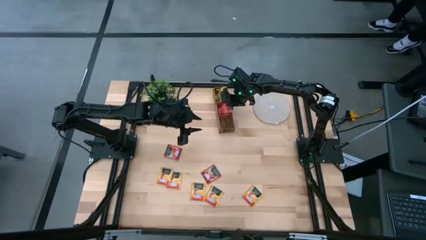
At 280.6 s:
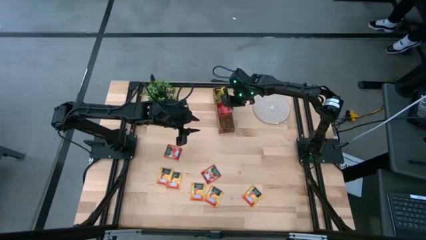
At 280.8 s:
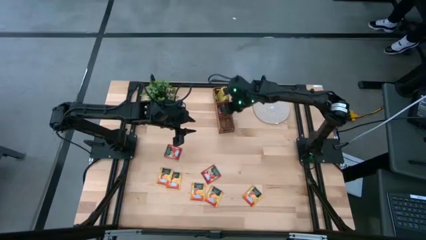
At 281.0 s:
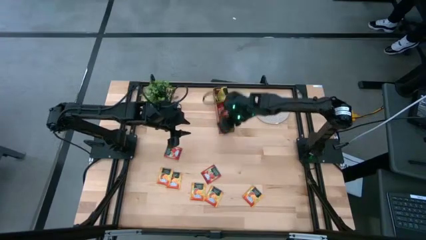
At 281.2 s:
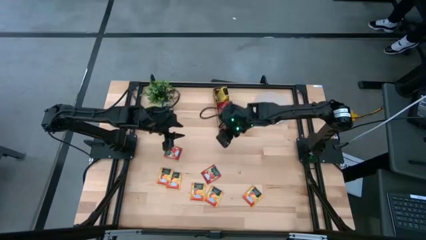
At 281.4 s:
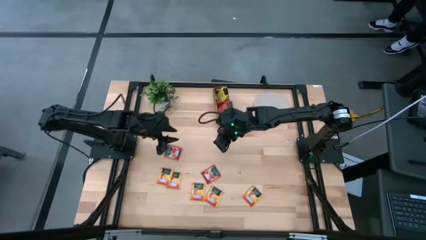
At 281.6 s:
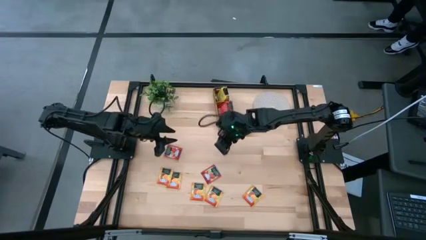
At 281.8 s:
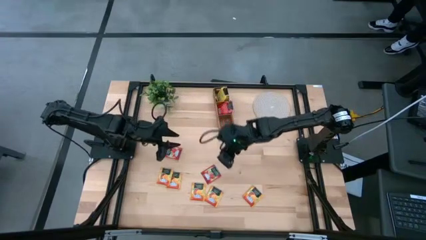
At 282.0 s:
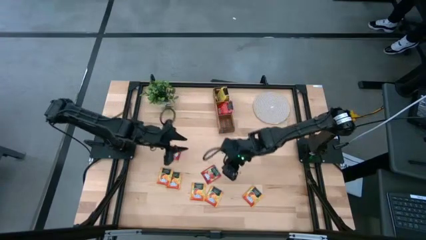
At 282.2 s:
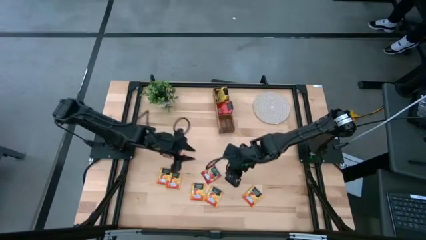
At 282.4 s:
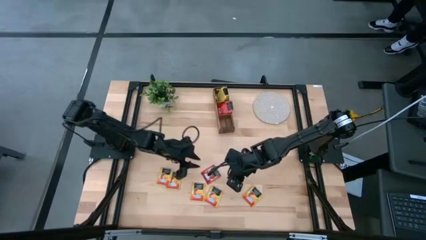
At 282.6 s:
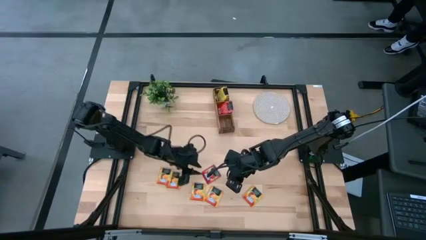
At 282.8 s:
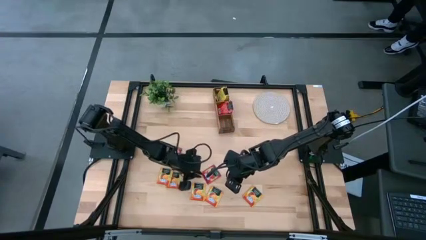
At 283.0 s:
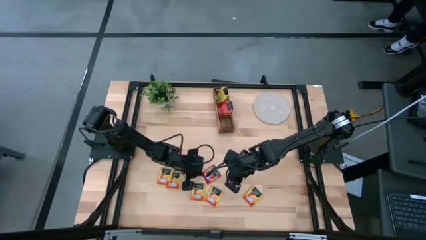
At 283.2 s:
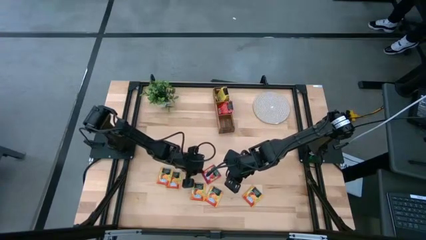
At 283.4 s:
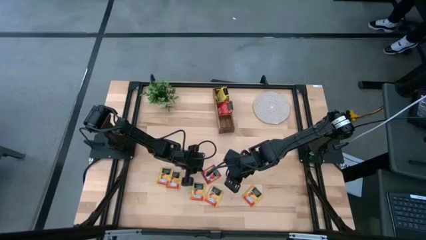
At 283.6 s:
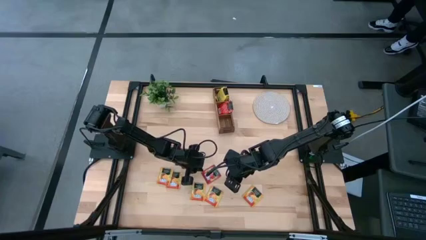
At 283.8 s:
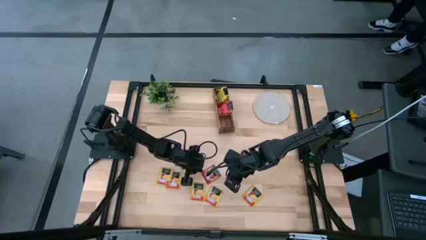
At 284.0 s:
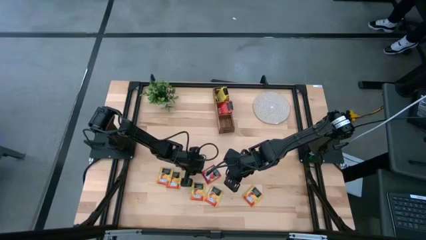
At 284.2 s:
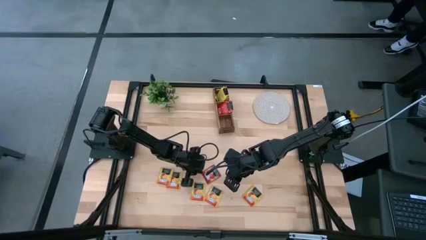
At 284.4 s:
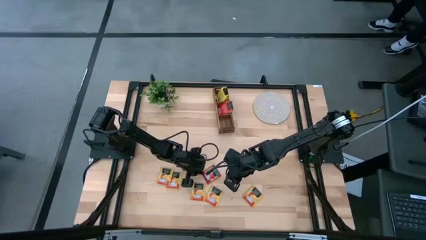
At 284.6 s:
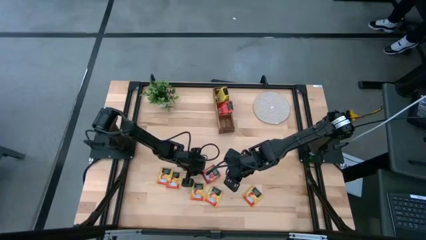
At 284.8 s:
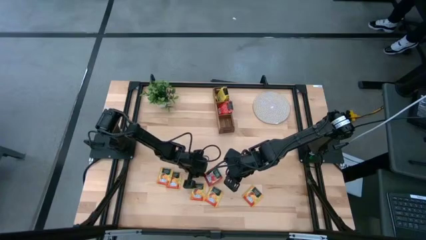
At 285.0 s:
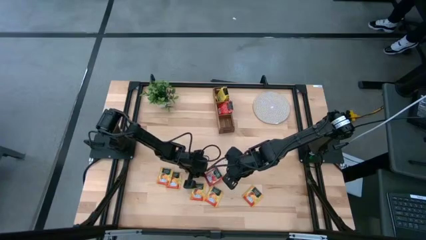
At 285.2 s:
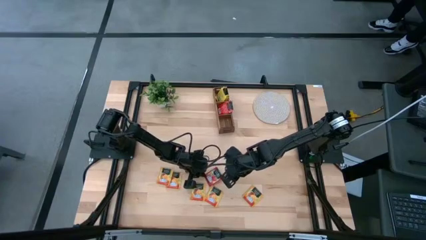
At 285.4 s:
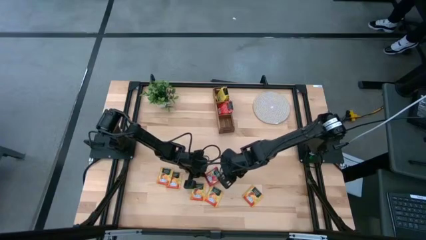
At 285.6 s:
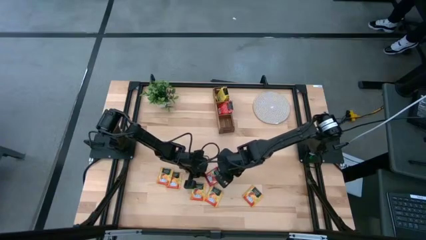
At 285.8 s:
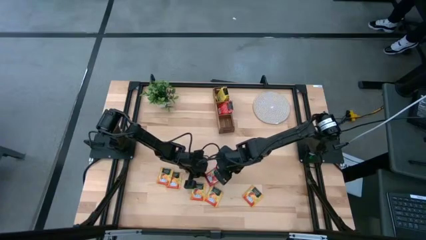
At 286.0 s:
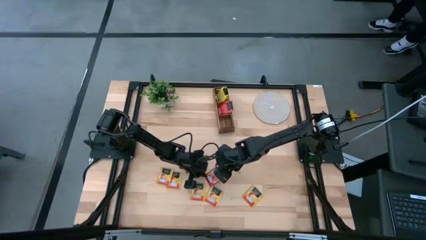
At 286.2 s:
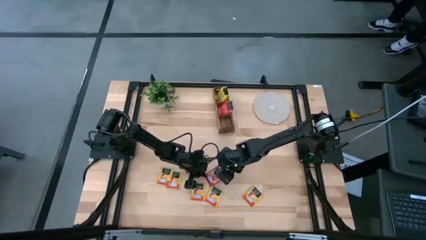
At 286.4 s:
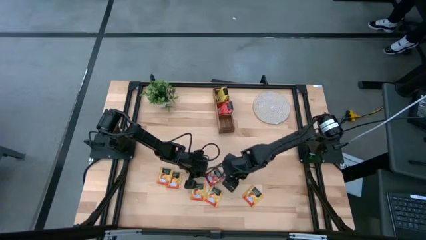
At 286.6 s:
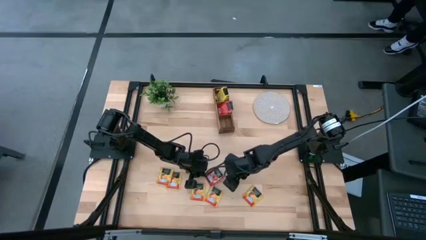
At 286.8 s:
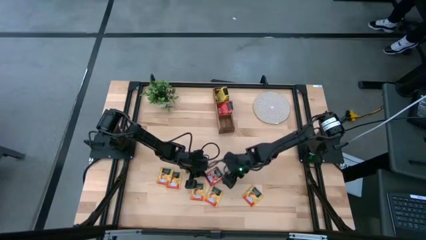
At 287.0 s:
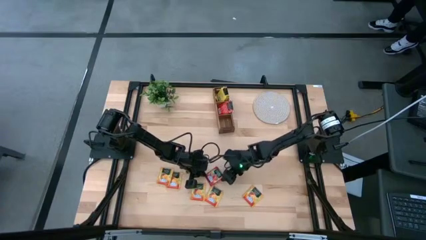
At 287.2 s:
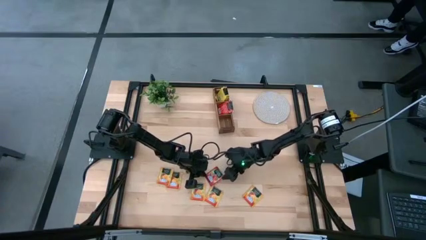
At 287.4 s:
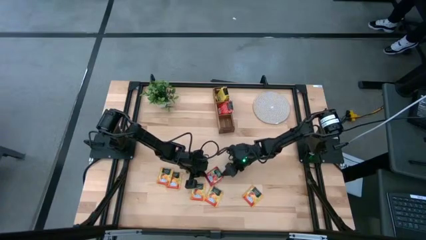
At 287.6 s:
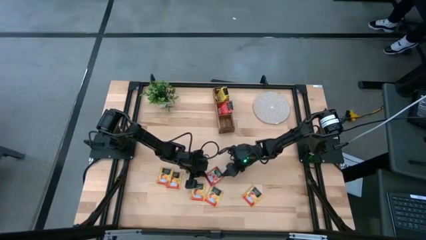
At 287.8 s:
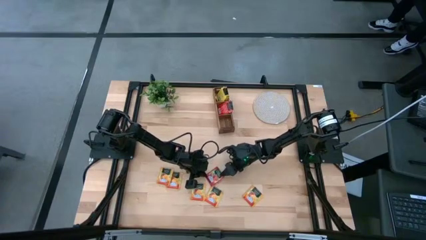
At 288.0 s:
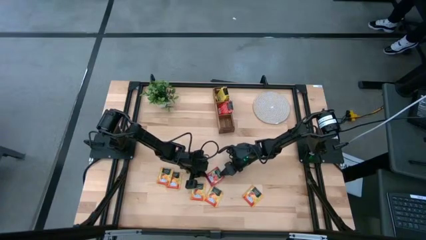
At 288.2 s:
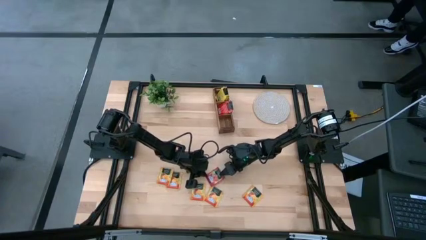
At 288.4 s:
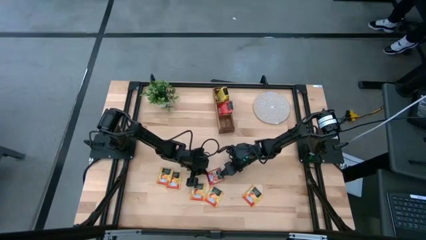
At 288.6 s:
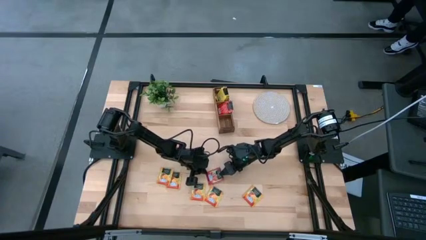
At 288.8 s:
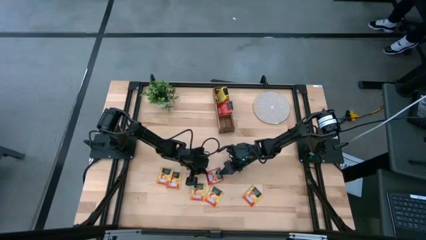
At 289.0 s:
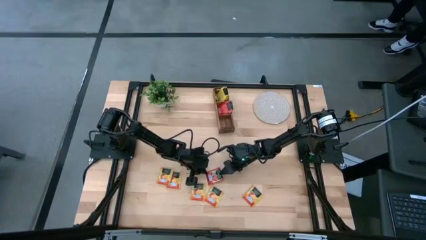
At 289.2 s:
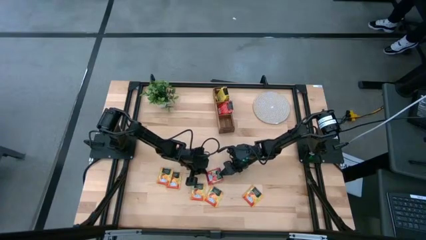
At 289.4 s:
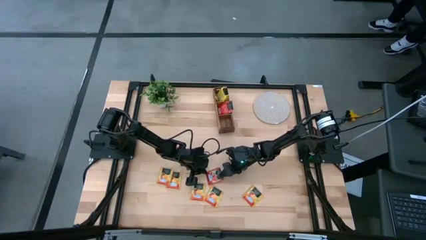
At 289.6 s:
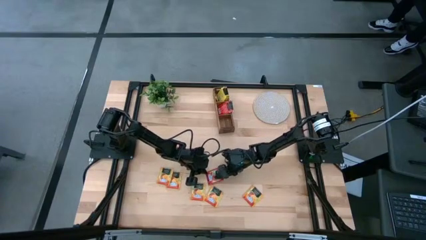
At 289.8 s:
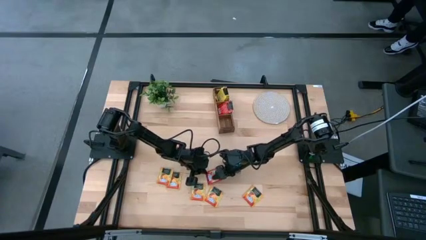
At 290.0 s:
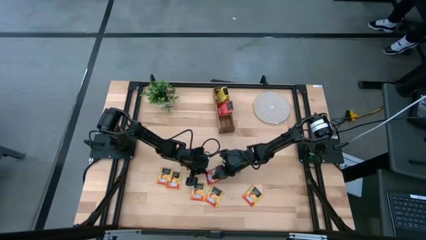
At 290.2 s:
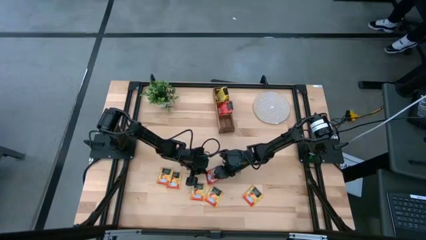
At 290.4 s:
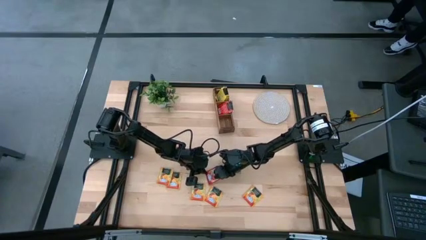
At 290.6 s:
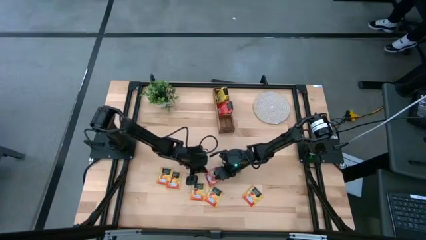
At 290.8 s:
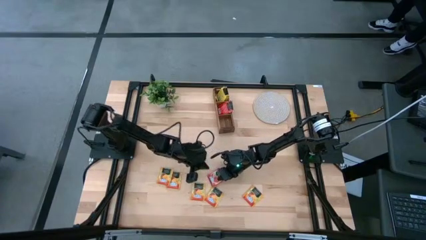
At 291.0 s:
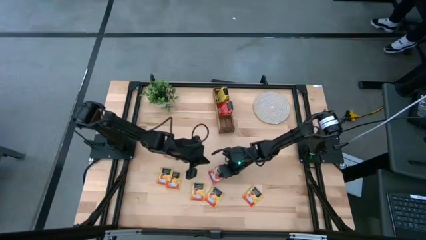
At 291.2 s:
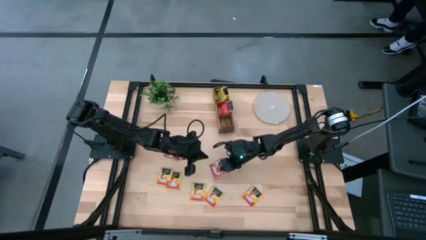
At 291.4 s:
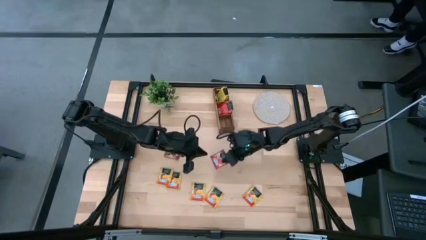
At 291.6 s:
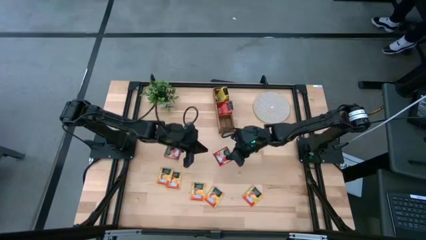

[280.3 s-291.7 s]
Task: Pick & Place Tea
Put the red tea bag into the middle section of the wooden organizer

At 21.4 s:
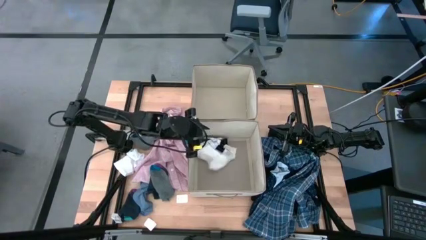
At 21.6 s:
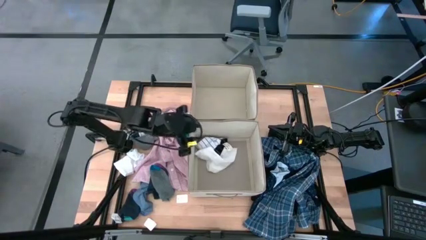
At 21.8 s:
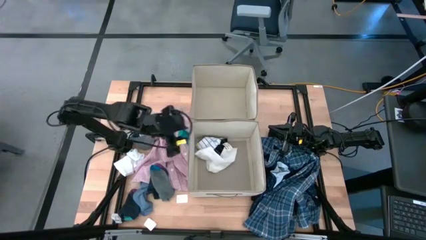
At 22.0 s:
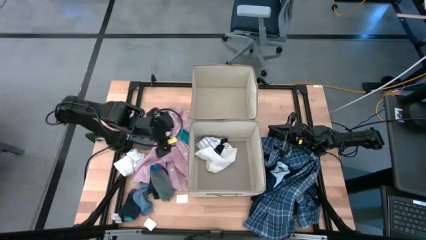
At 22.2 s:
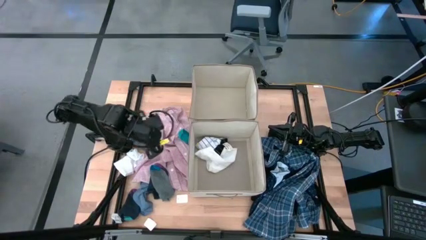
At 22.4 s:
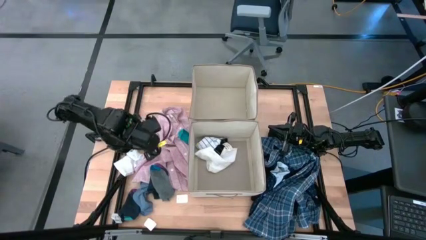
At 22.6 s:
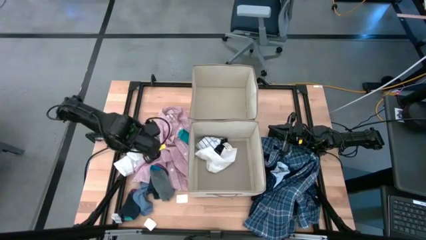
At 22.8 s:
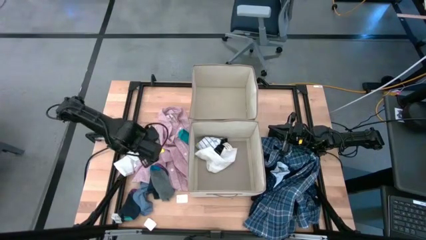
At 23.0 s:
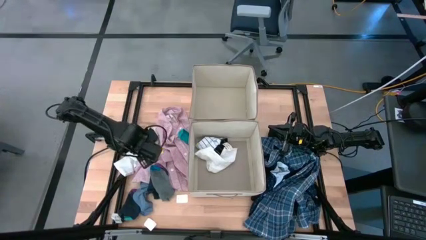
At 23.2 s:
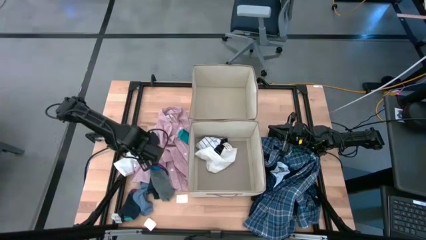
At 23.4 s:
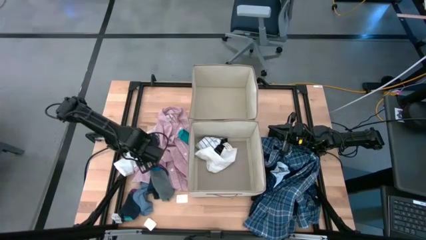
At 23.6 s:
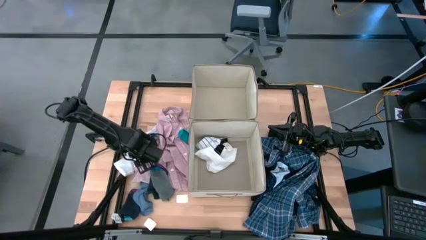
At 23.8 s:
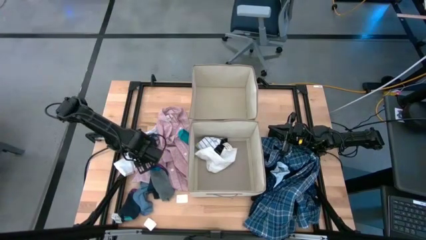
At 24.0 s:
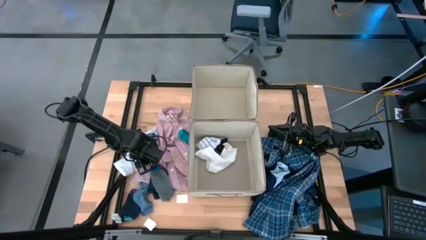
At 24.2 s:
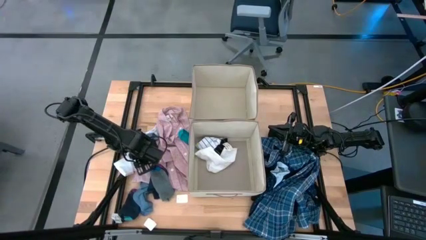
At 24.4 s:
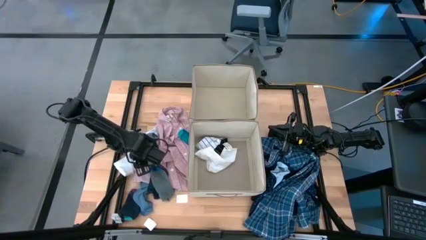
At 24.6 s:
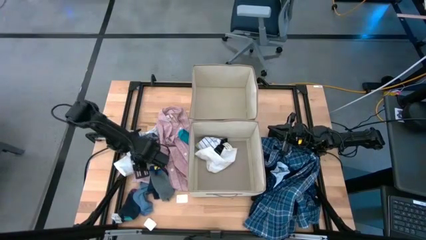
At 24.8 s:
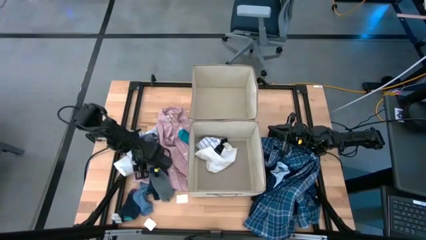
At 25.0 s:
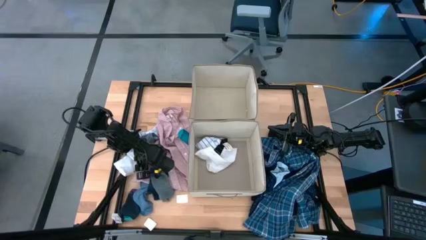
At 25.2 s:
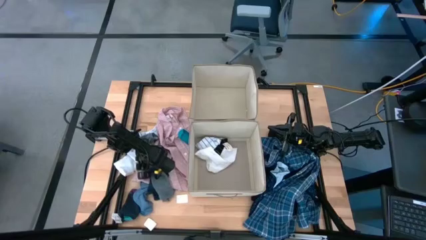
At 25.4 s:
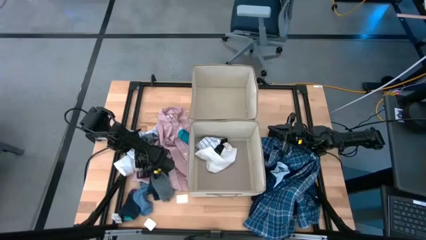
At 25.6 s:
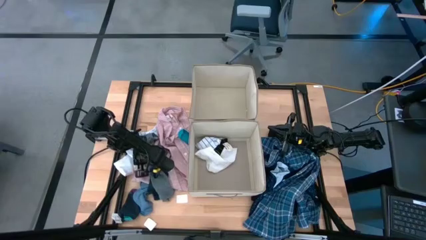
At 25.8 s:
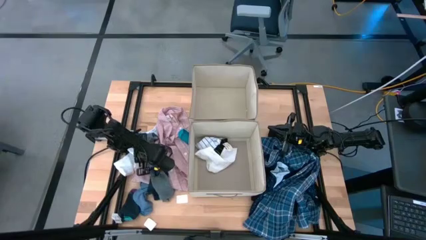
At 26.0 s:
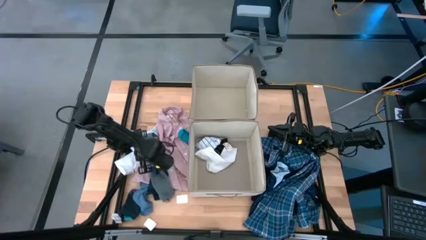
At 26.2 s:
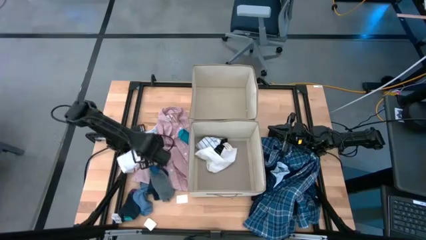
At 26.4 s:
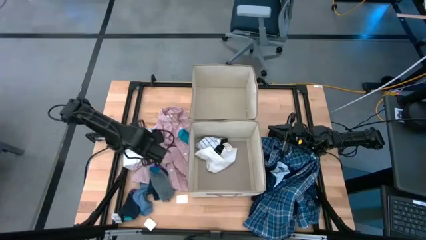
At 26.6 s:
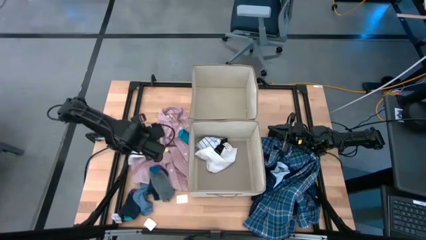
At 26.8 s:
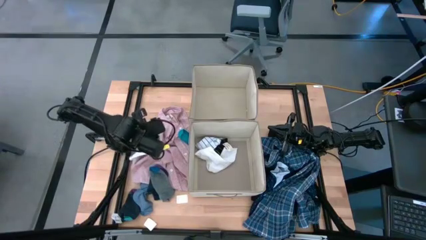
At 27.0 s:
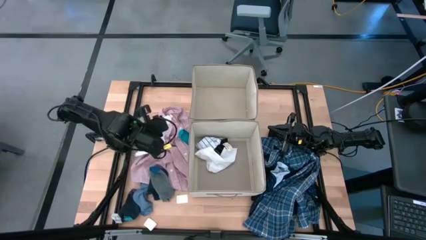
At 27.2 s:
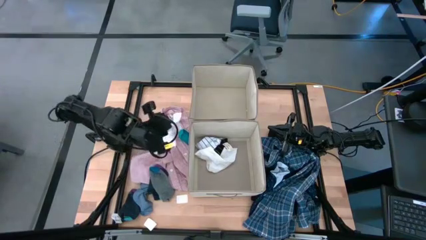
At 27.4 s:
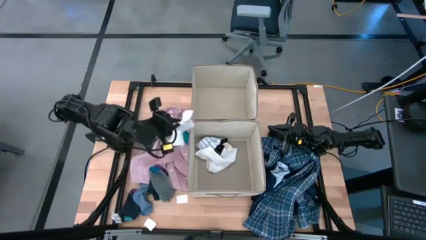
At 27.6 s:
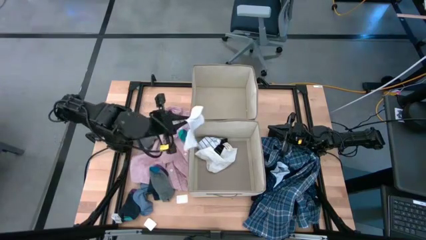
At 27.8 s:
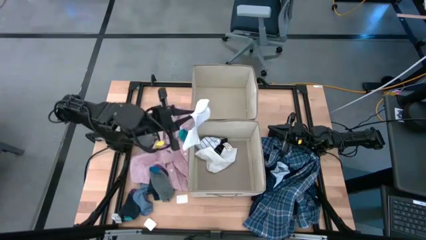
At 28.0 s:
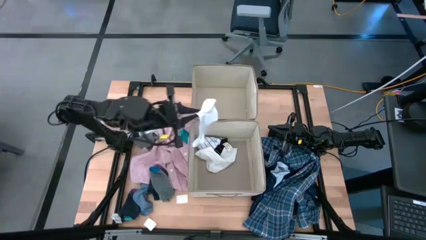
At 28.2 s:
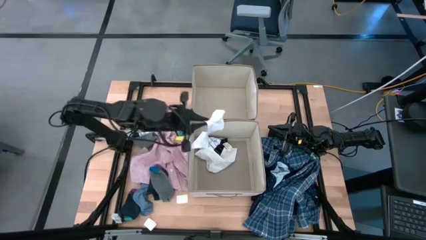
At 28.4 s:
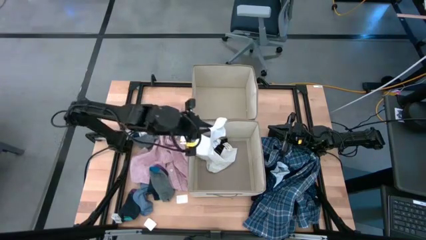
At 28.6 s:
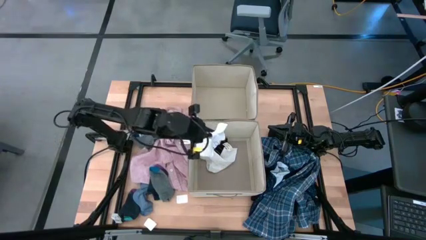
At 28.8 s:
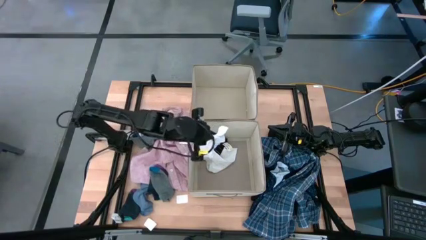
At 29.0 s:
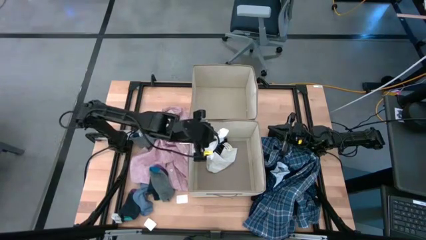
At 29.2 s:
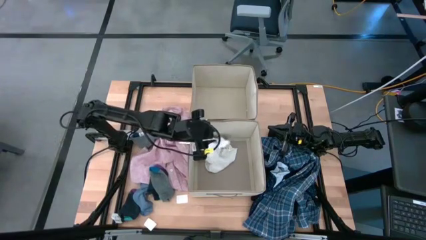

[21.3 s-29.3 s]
Task: Sort clothes
Put the white sock into the bottom laundry organizer
